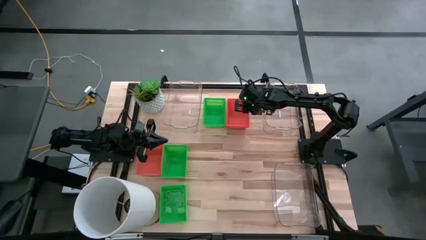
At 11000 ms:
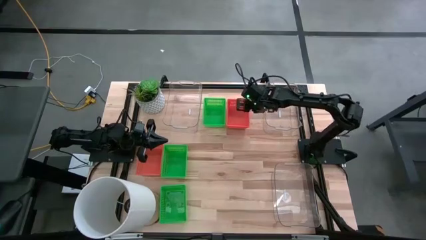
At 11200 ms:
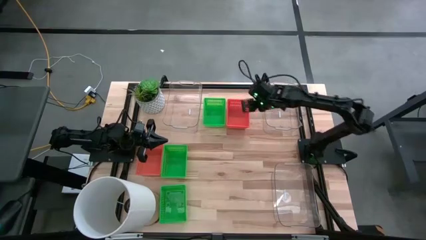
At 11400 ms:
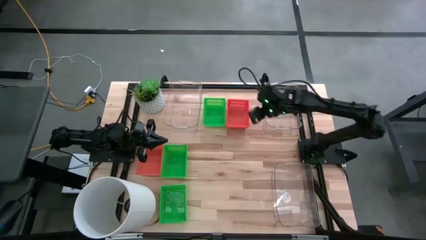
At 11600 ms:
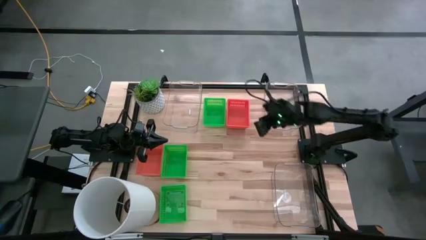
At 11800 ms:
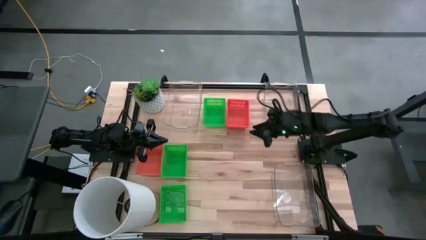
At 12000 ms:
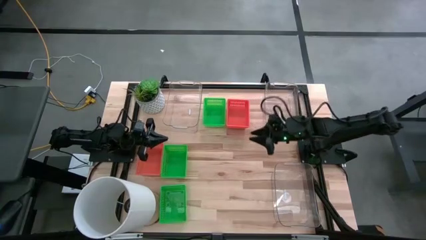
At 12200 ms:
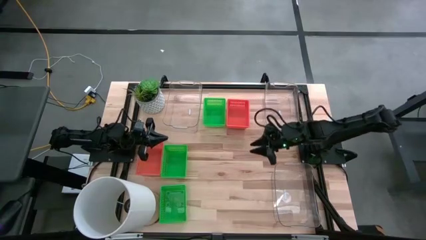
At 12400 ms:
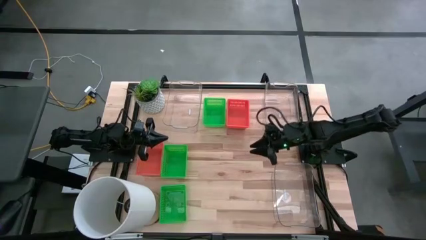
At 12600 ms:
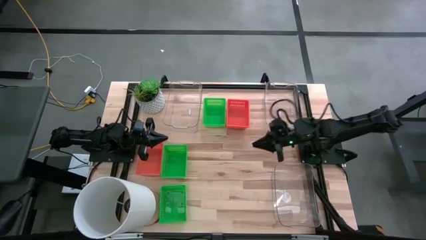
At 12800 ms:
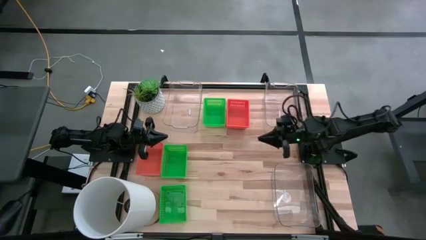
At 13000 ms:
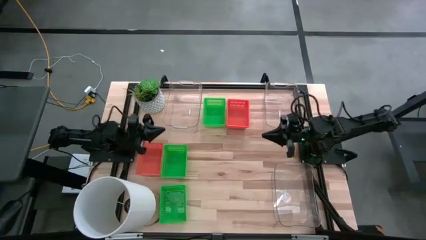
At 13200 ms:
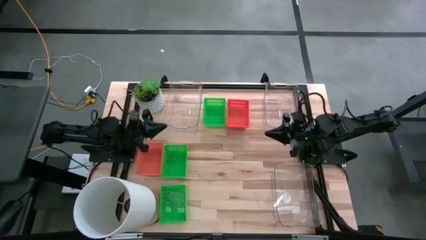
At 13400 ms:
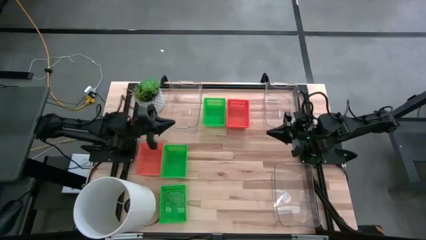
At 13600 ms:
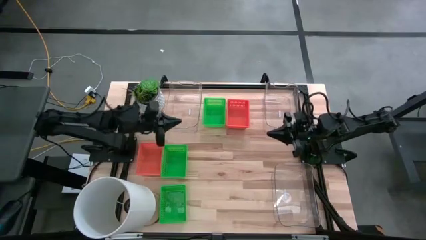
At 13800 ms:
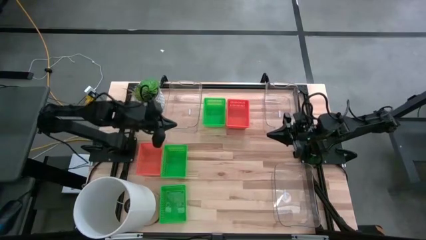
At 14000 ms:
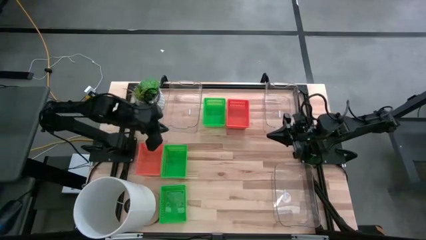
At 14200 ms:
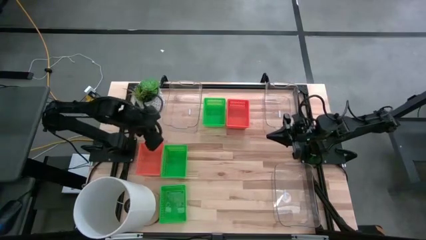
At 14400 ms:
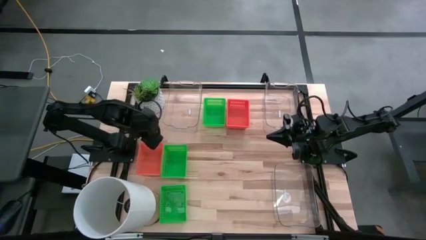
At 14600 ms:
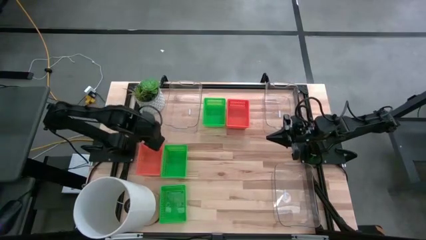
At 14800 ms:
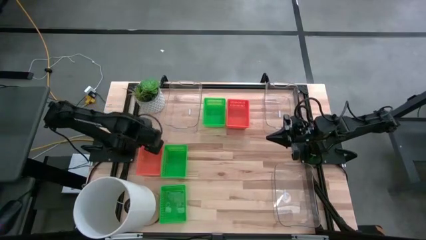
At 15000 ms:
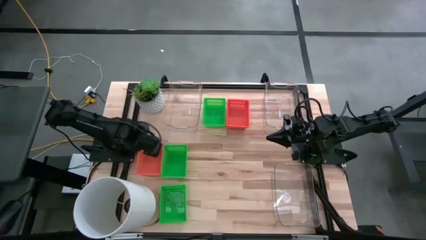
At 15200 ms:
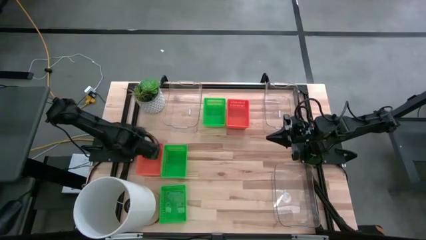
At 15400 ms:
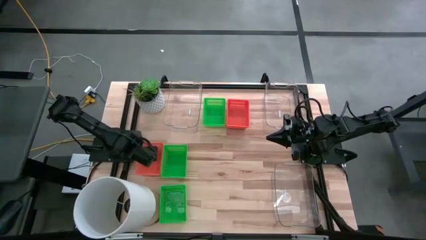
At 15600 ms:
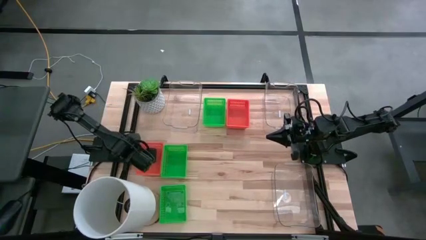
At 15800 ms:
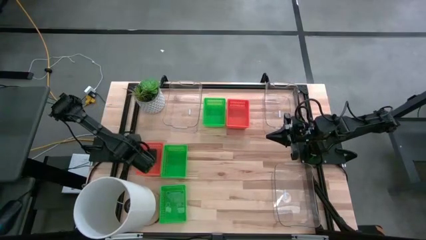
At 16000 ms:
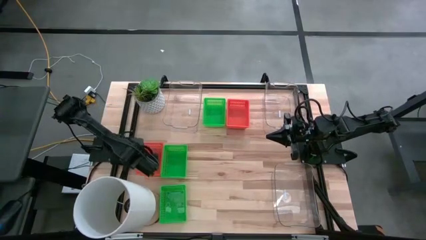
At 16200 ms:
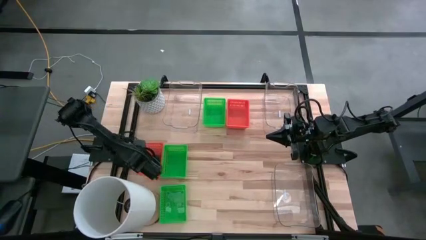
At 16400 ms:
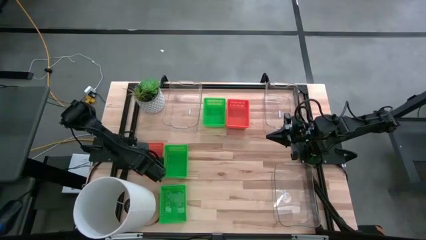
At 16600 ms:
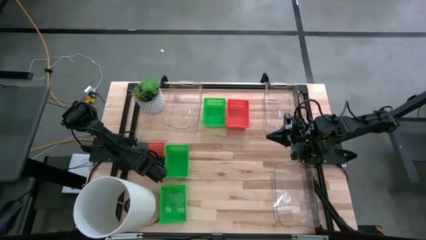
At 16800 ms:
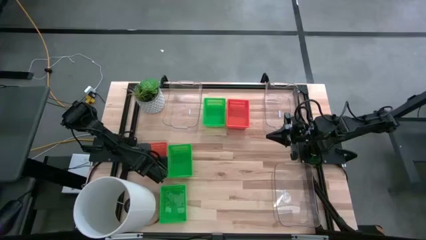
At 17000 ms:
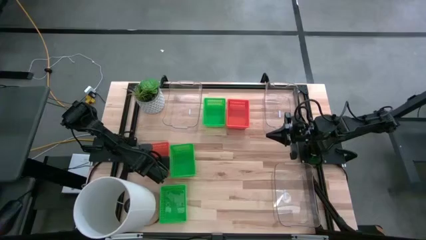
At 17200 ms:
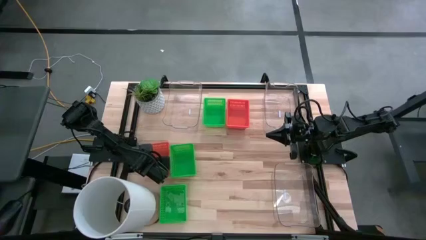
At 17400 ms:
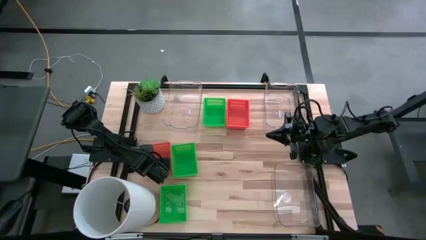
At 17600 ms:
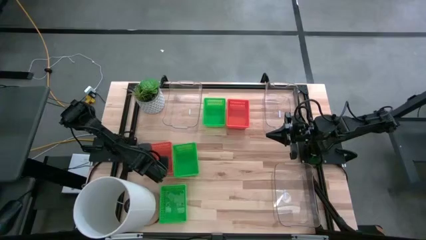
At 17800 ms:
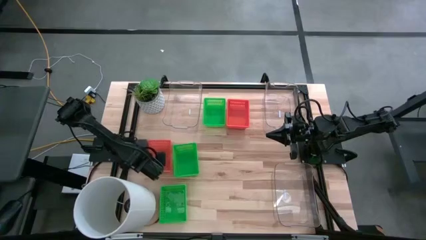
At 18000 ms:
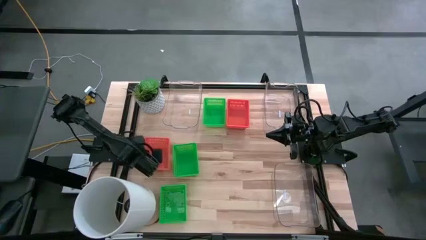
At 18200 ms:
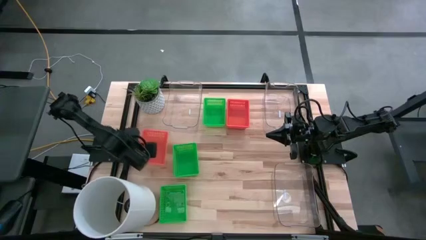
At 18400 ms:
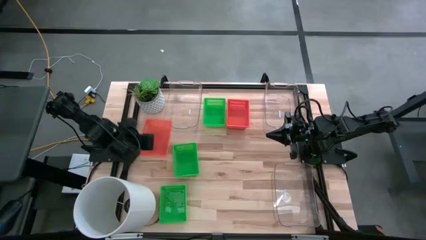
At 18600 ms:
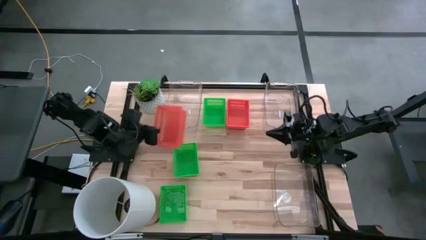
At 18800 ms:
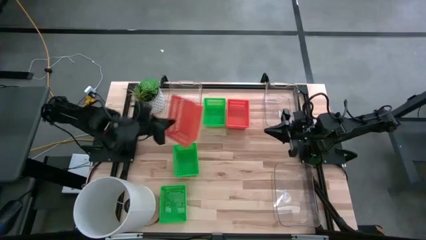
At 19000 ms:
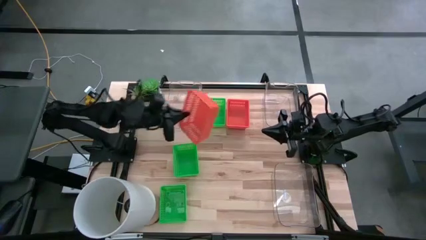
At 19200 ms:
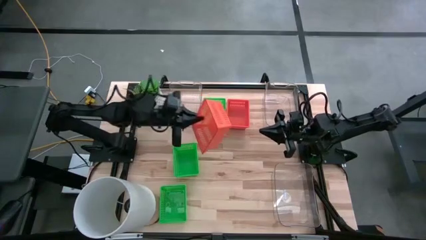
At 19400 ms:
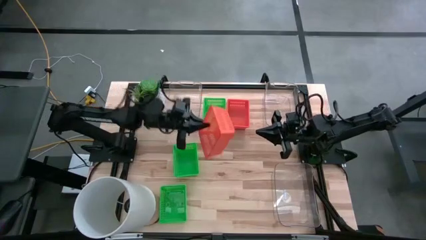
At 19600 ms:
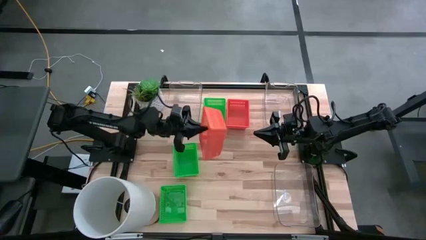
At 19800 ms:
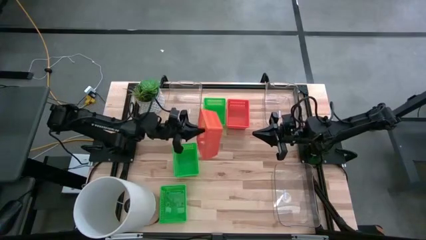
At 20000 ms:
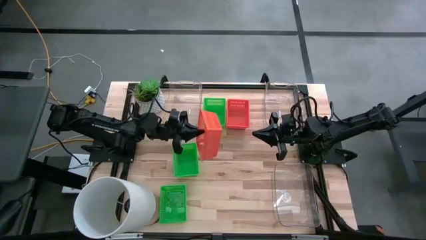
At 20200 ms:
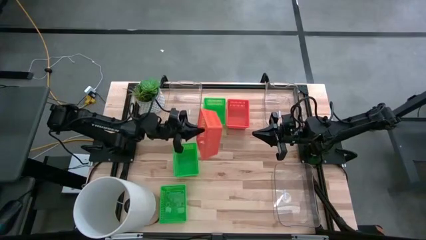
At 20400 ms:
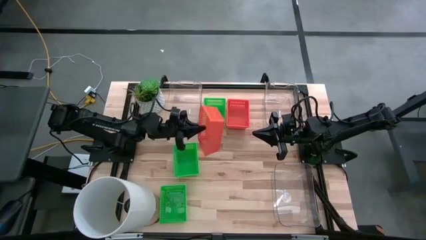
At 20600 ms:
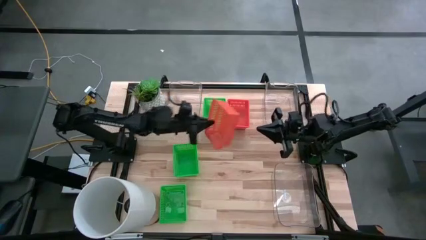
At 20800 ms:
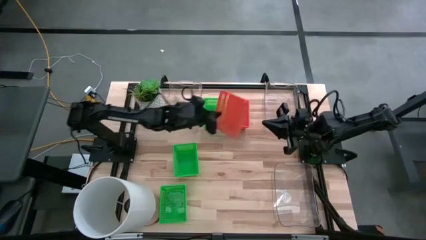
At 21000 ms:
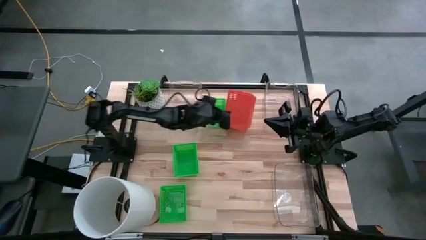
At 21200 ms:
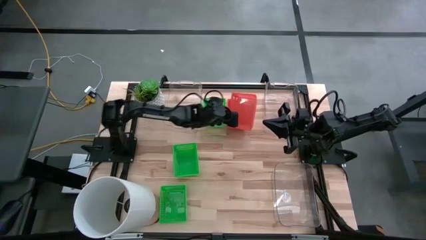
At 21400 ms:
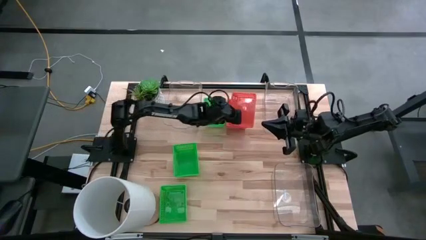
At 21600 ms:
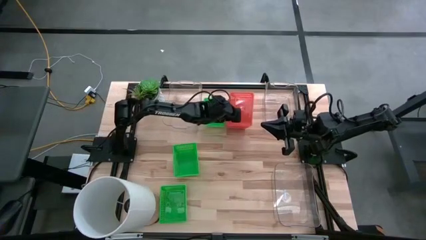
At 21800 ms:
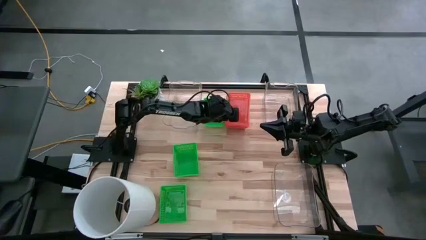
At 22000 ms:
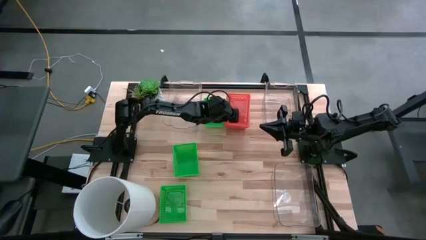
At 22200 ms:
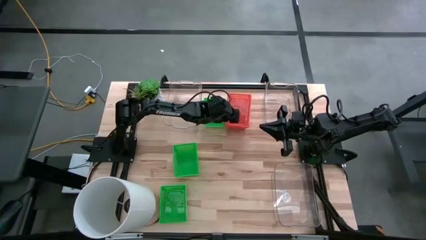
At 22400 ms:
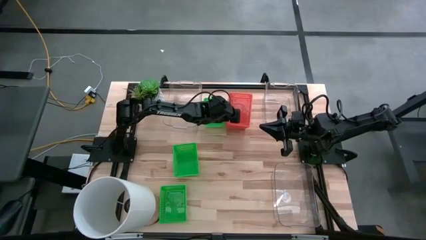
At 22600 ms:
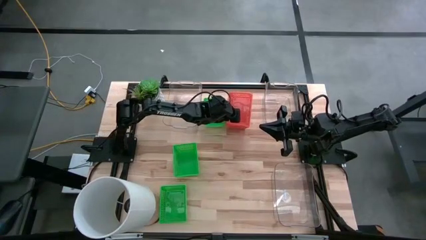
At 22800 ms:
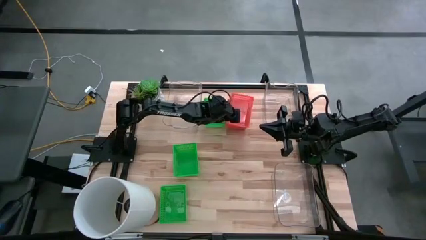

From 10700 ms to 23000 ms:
Stack the bottom orange bin on the top orange bins
